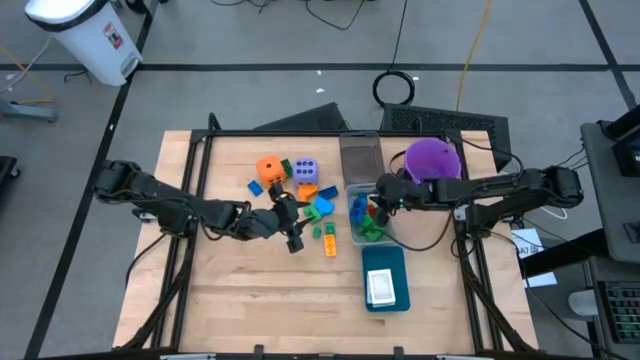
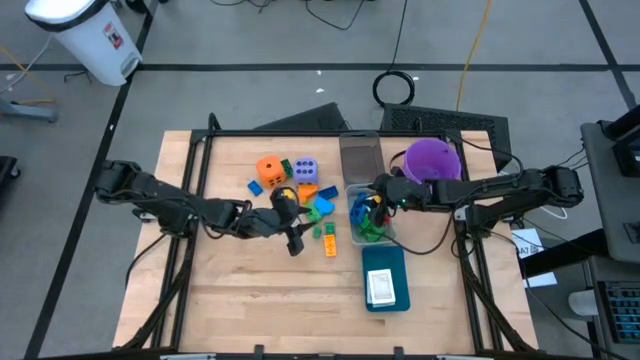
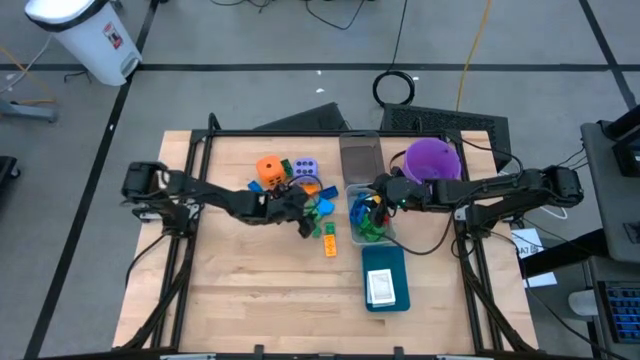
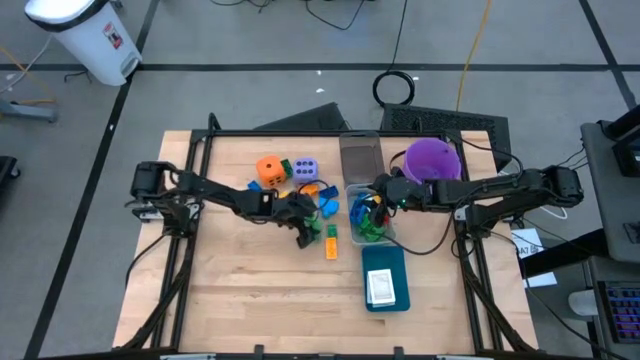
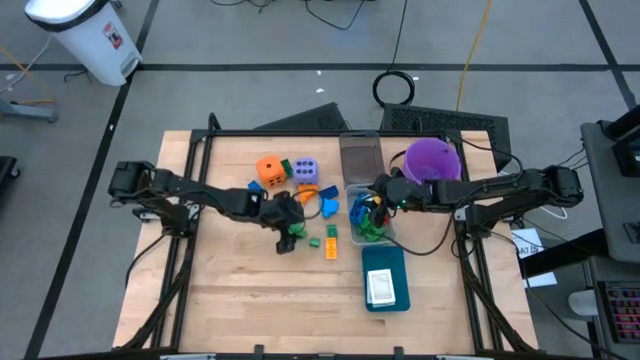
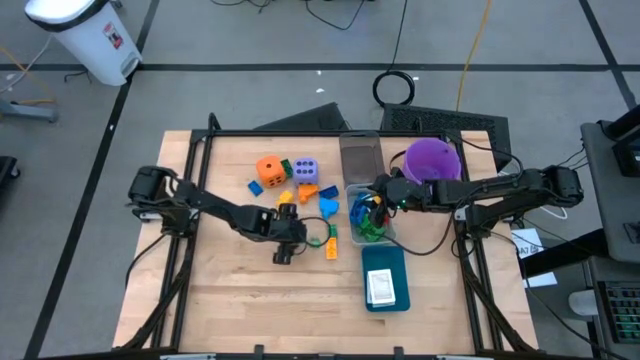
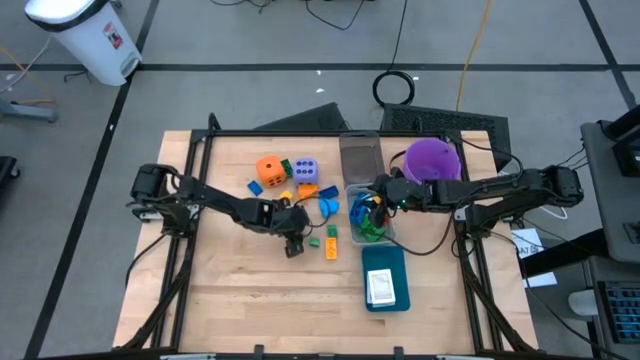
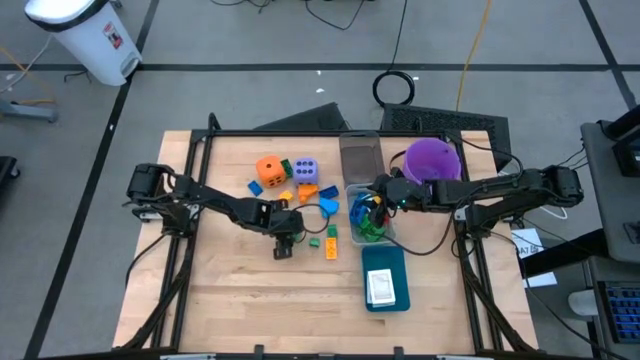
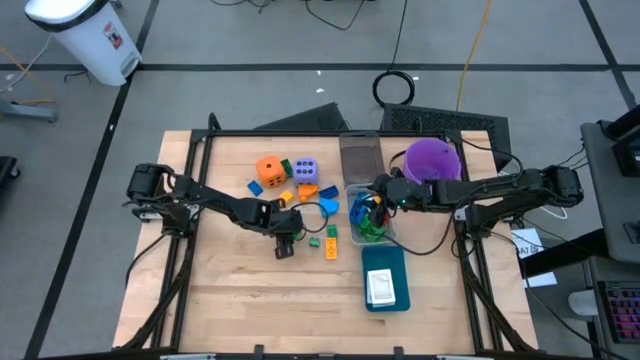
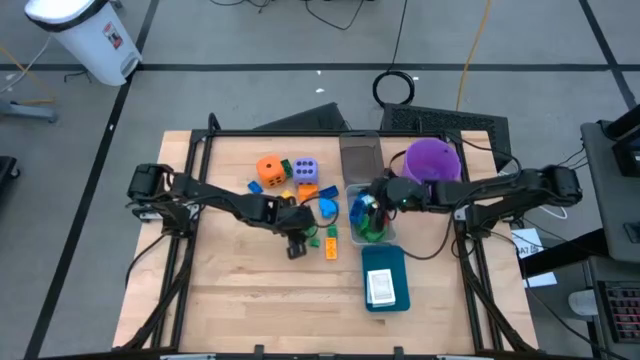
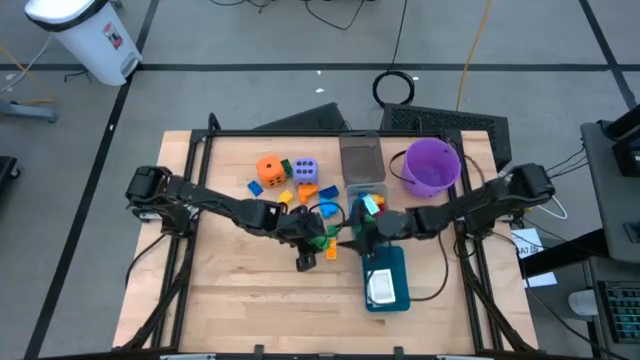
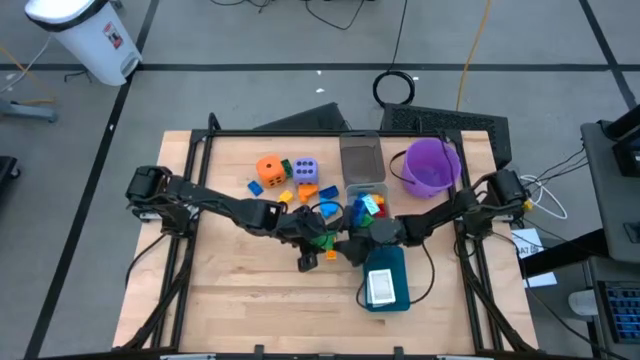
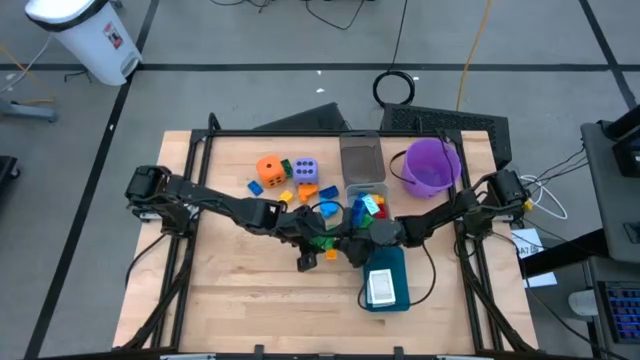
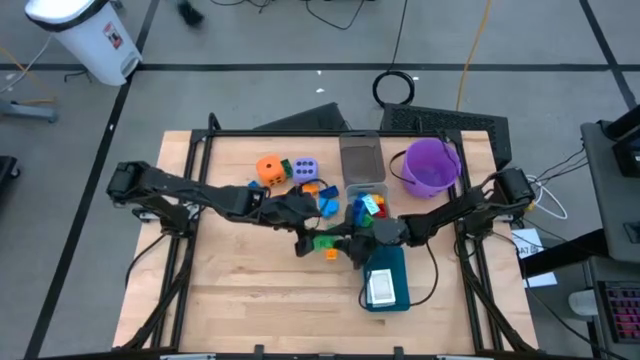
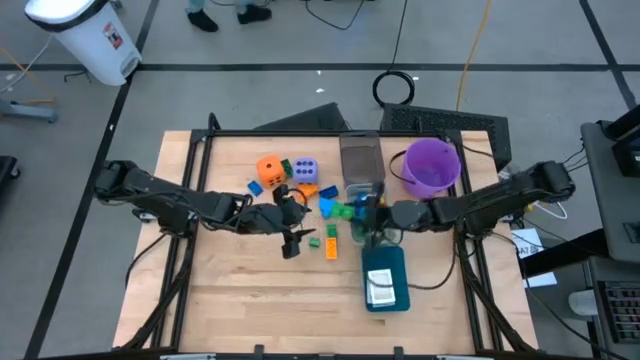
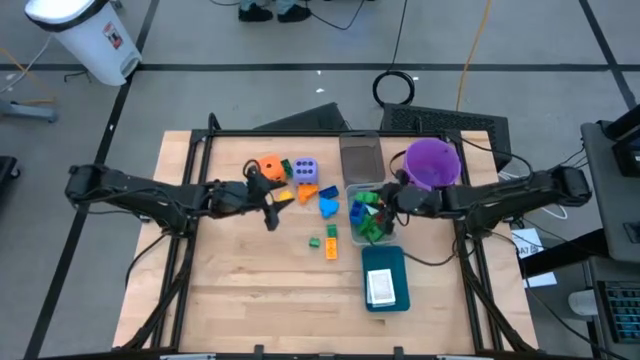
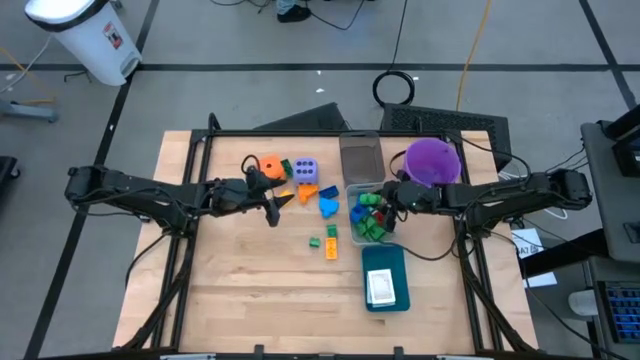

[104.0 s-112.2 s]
Task: Pick & Place Toys
Put the green game piece into the gray bin

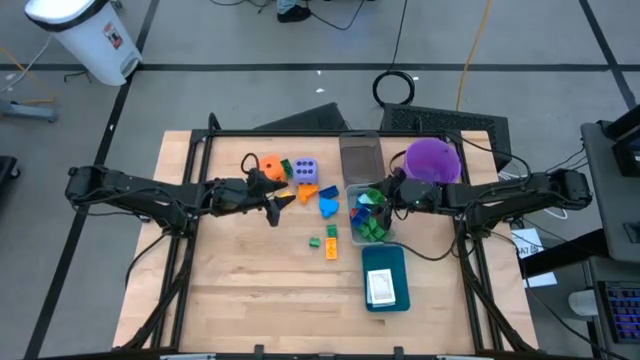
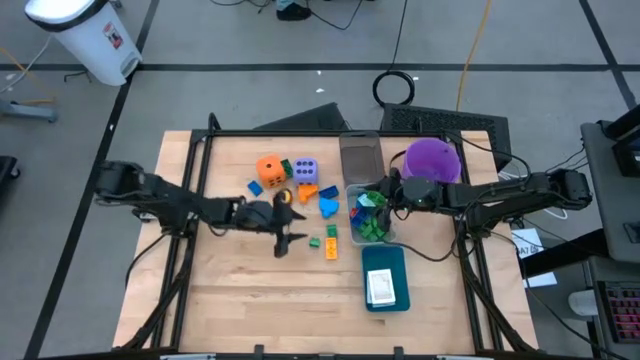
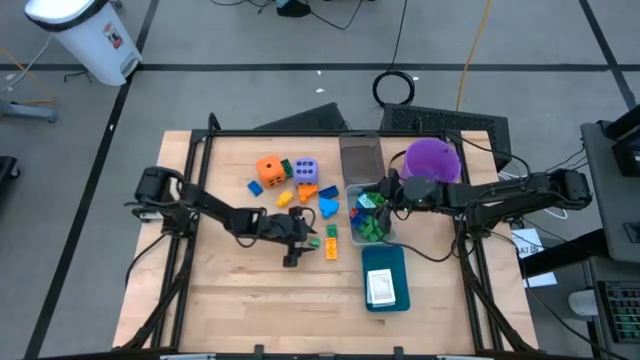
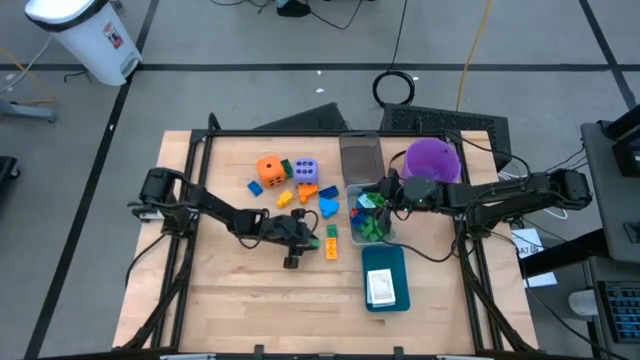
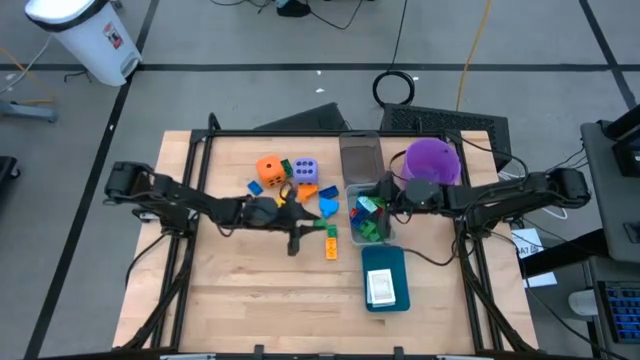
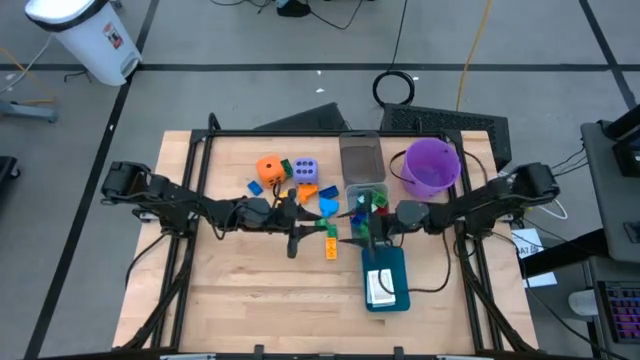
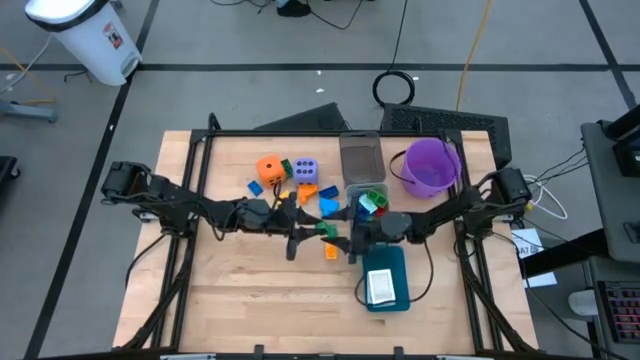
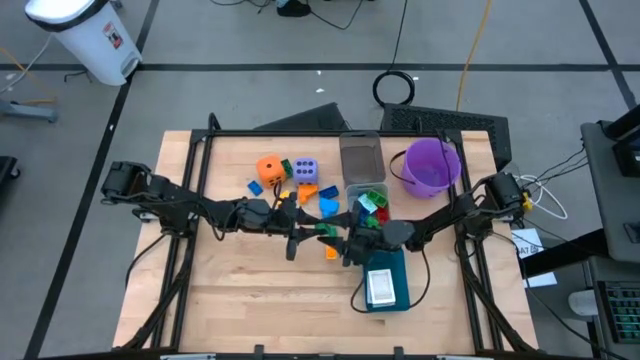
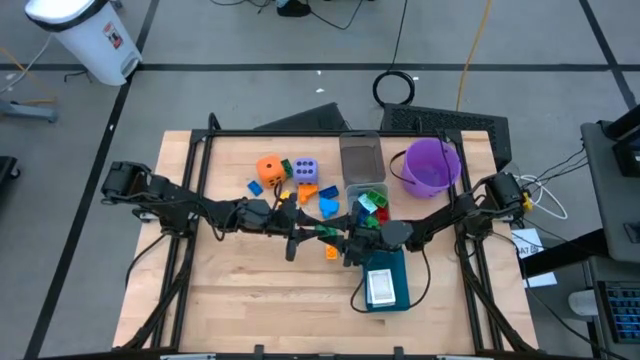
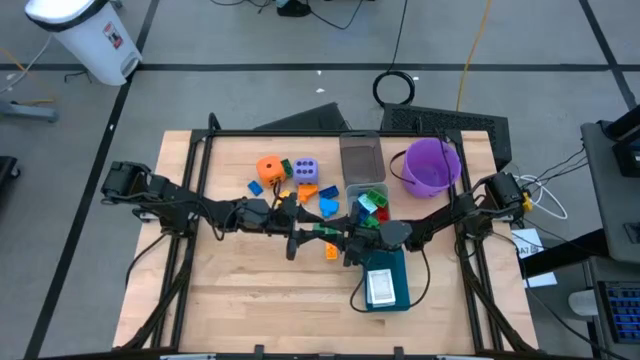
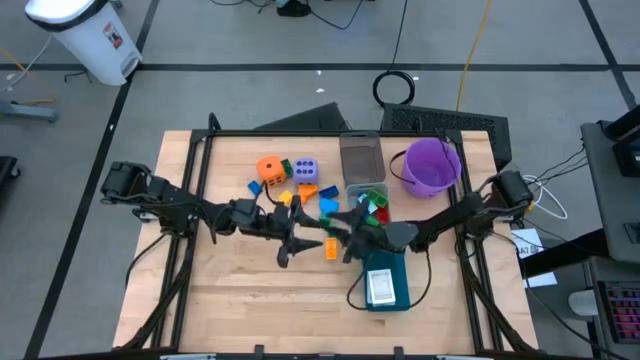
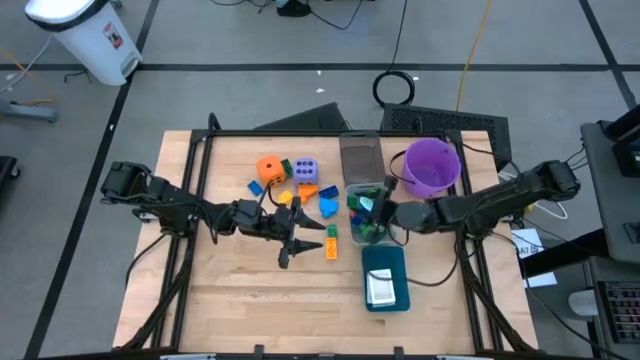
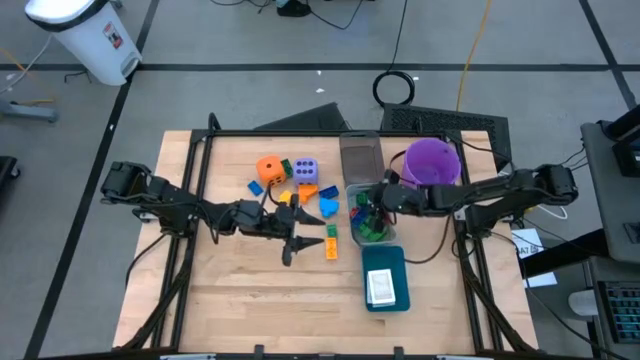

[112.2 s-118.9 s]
Put the dark green game piece into the gray bin

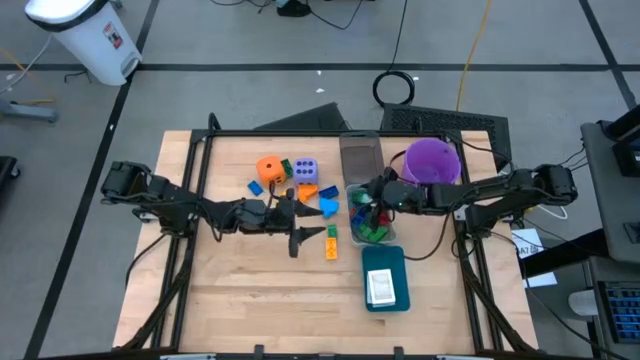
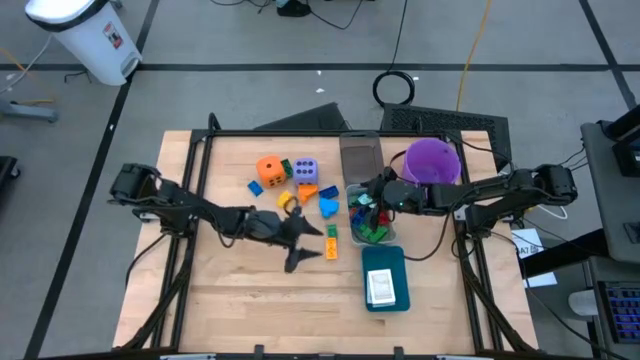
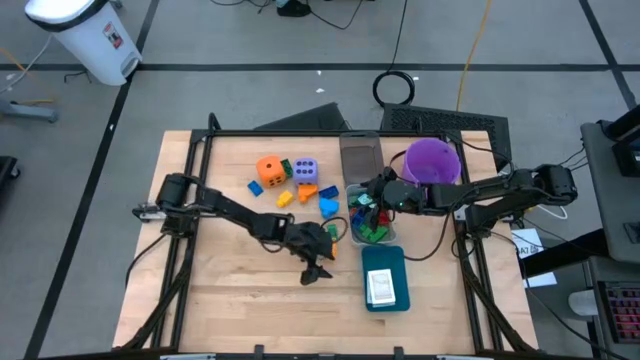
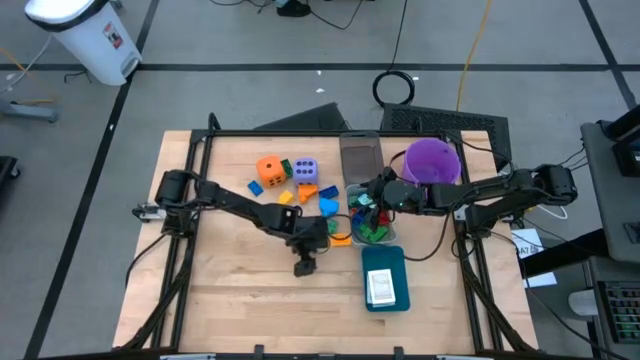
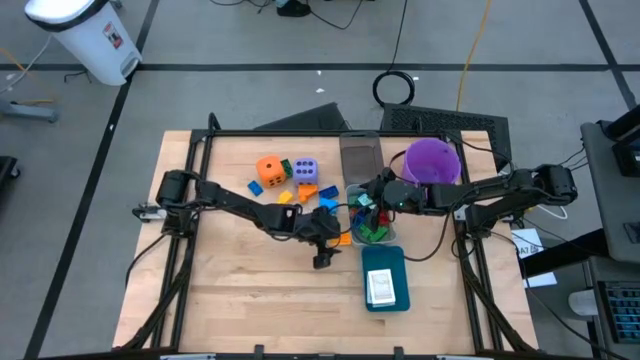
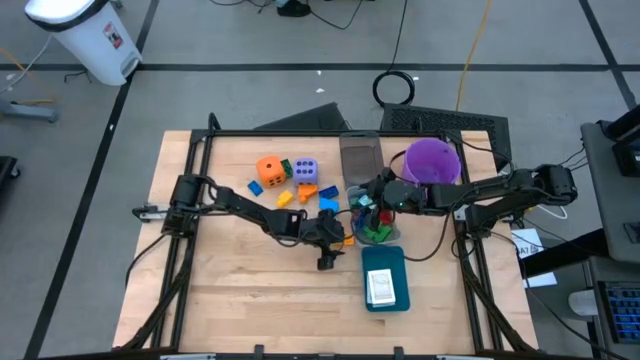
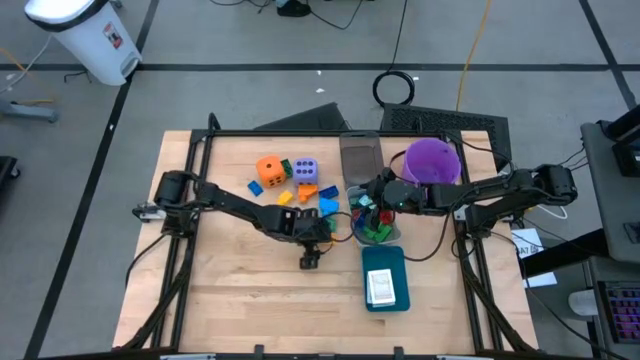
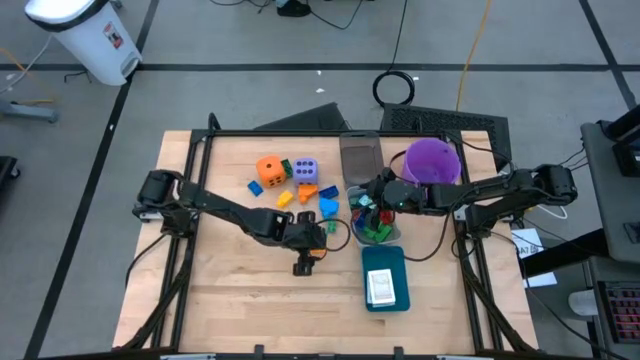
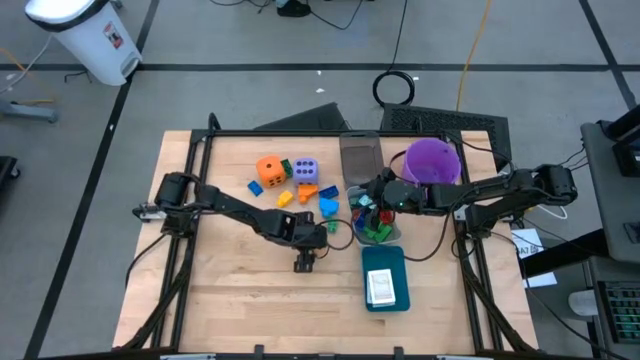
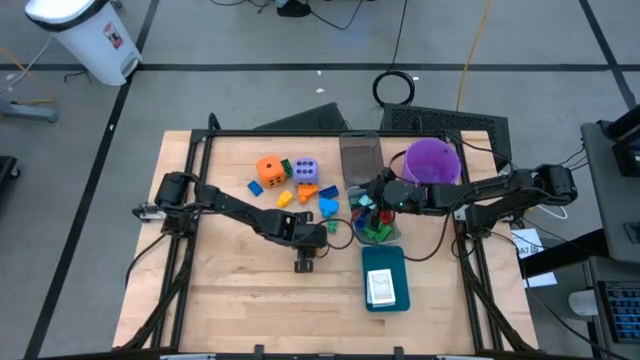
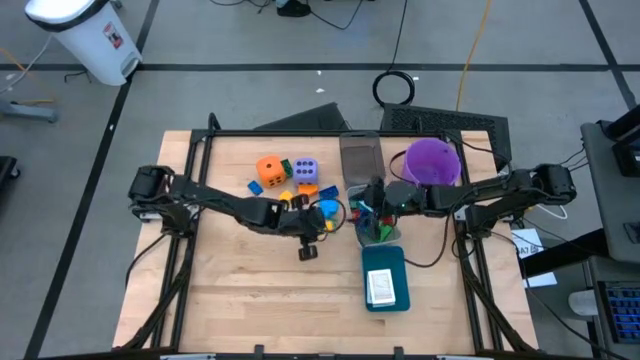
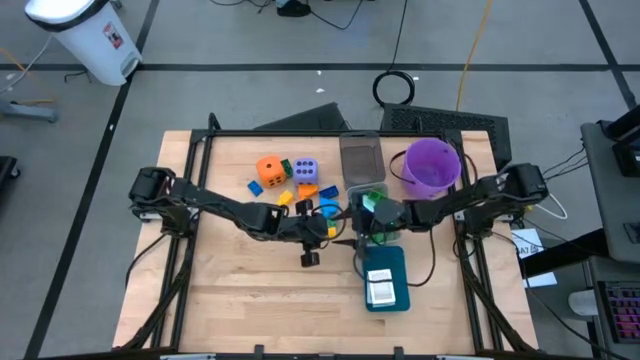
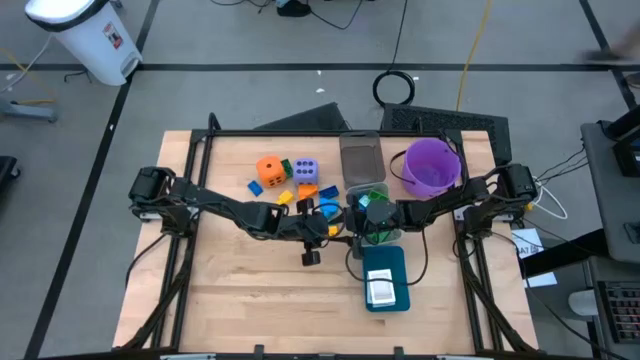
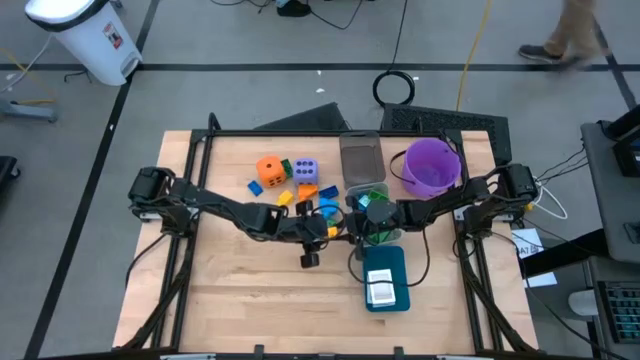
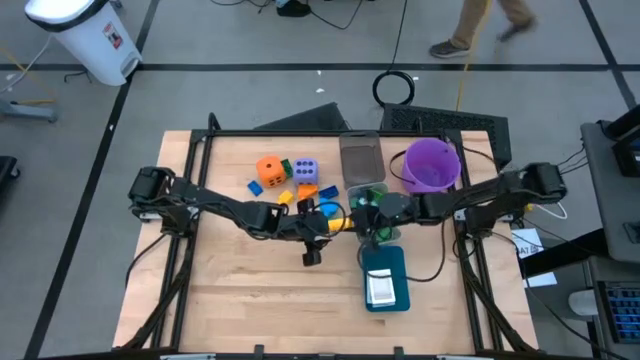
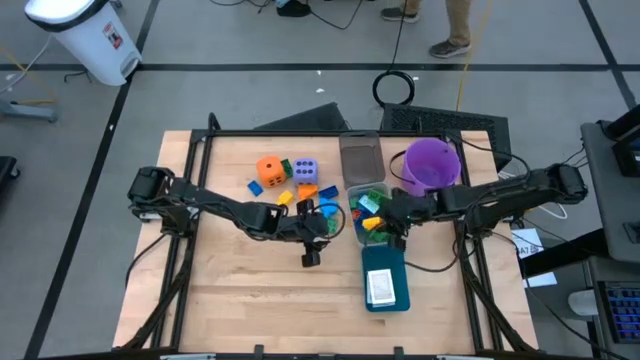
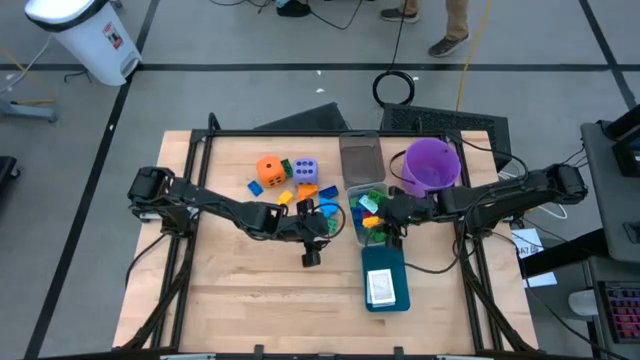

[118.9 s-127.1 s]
Put the yellow game piece into the gray bin
